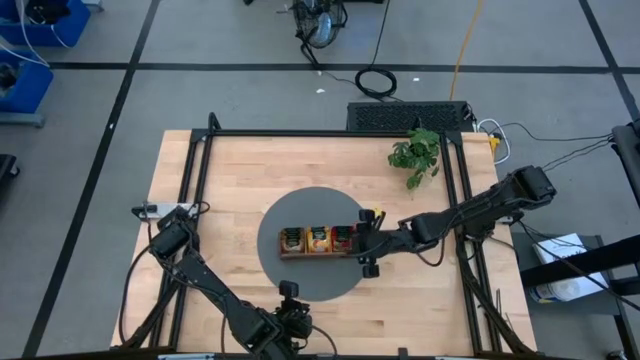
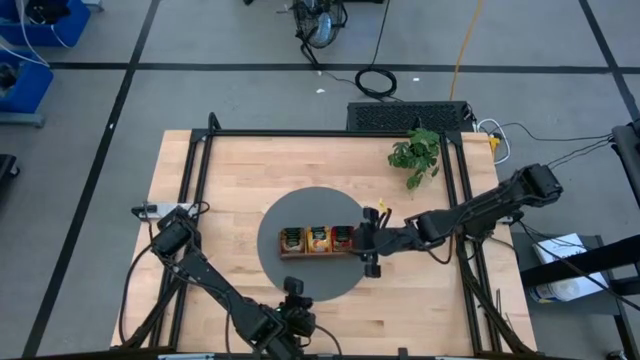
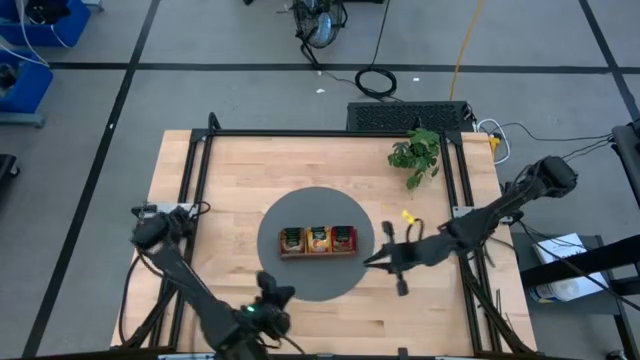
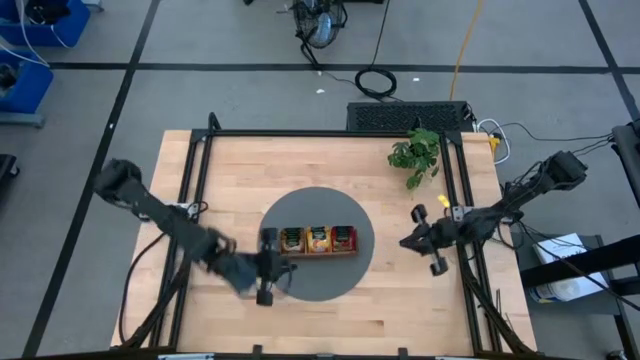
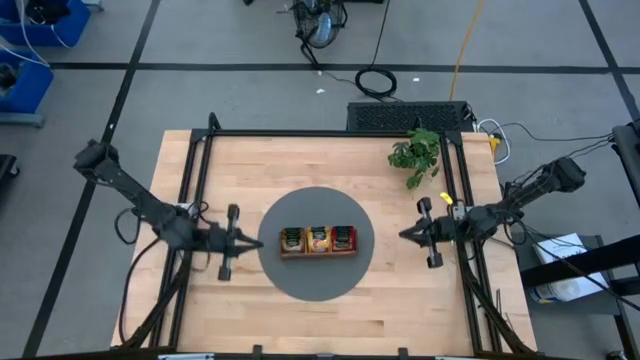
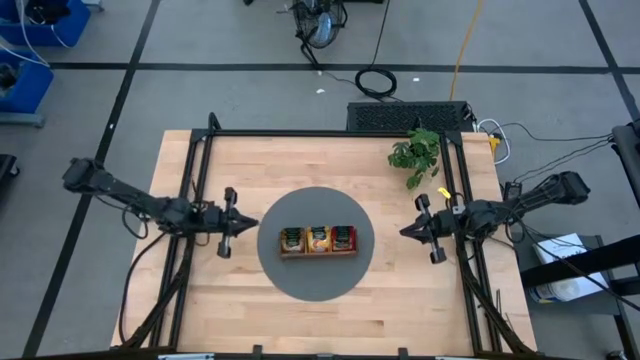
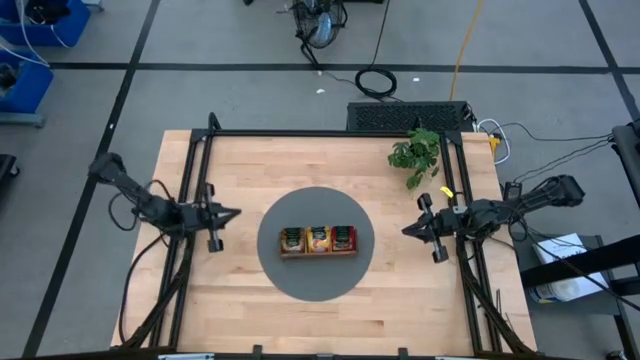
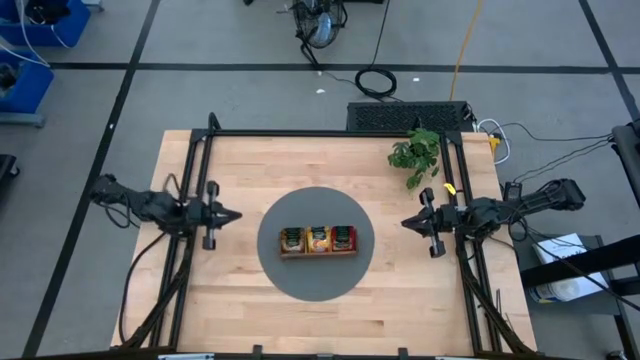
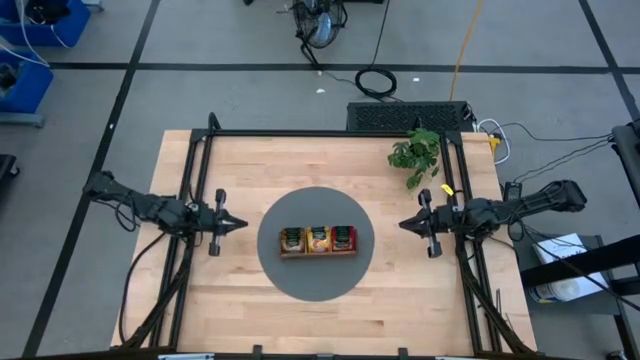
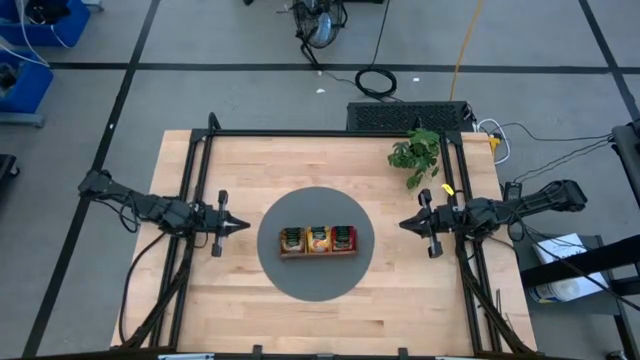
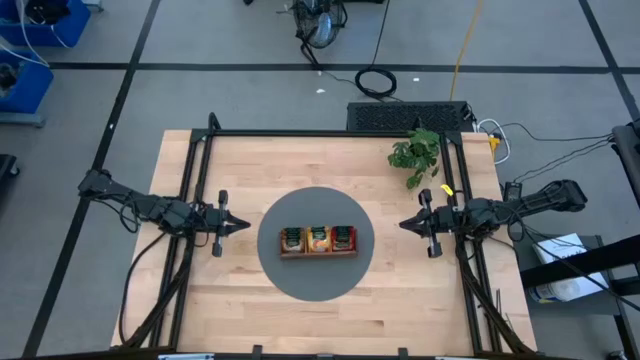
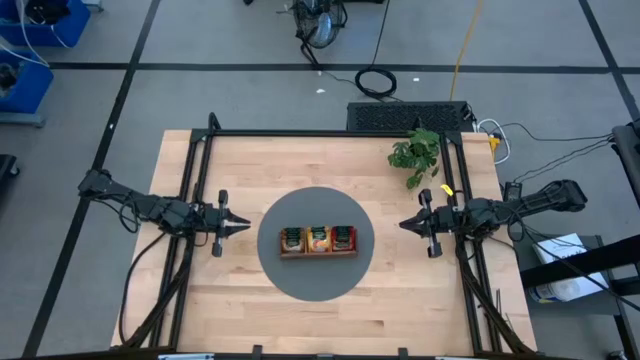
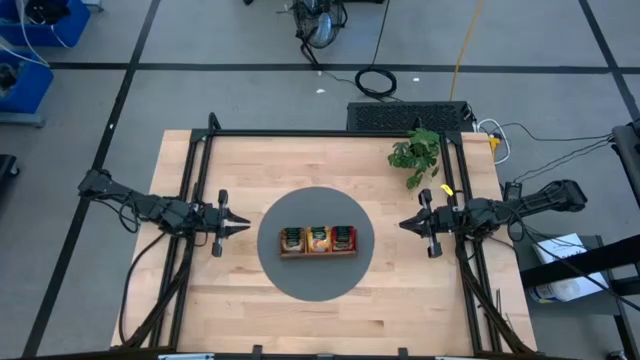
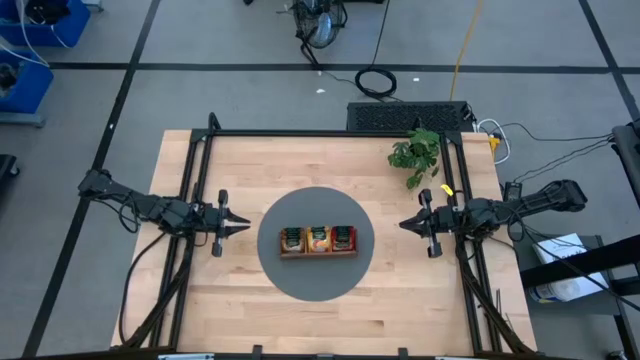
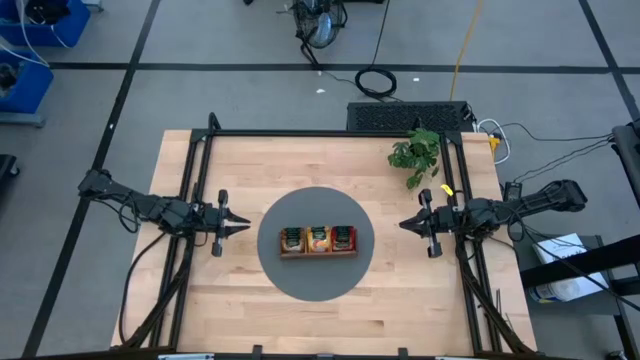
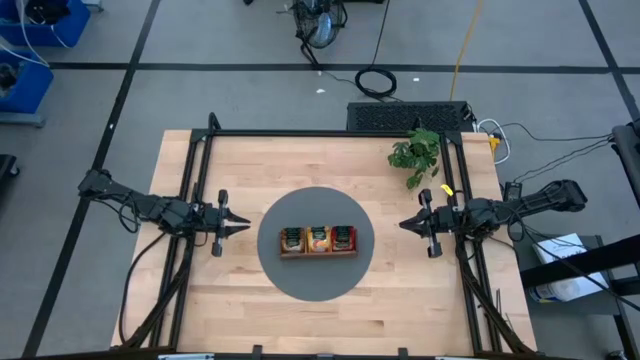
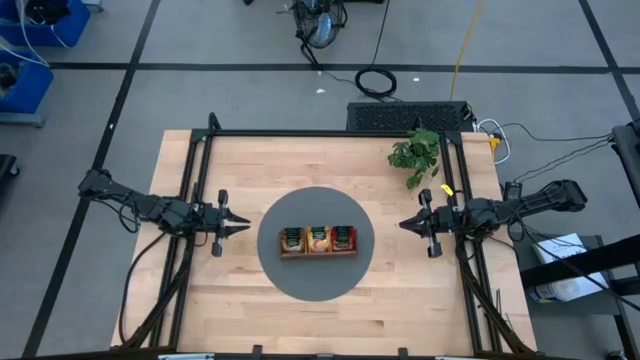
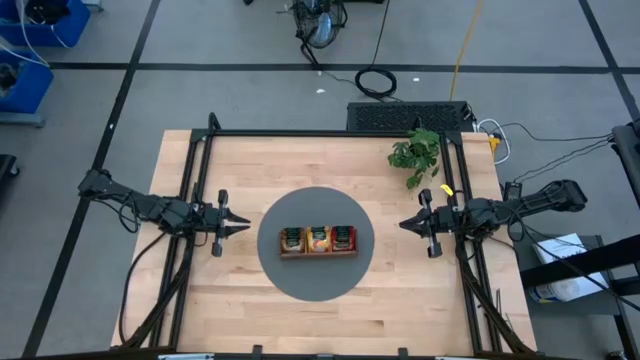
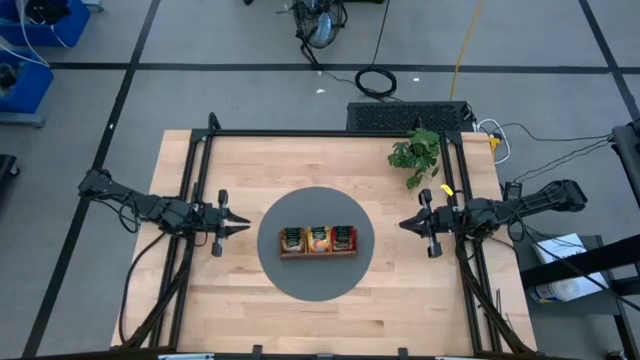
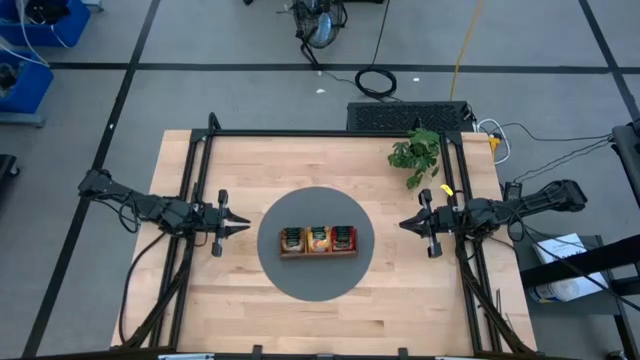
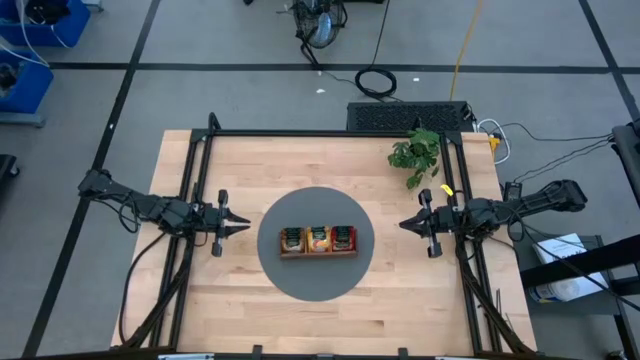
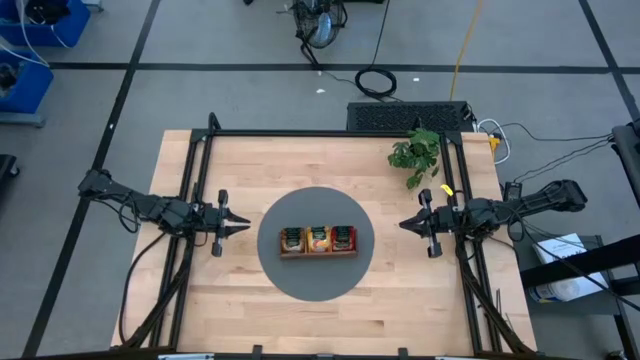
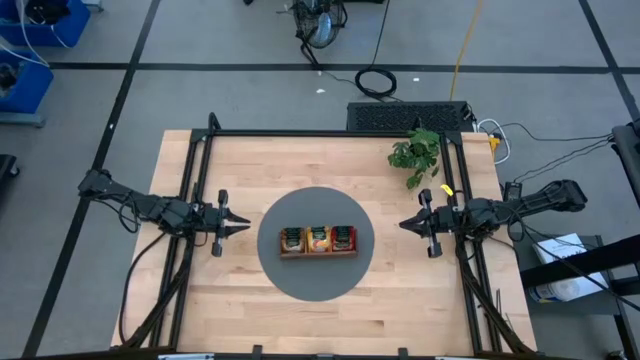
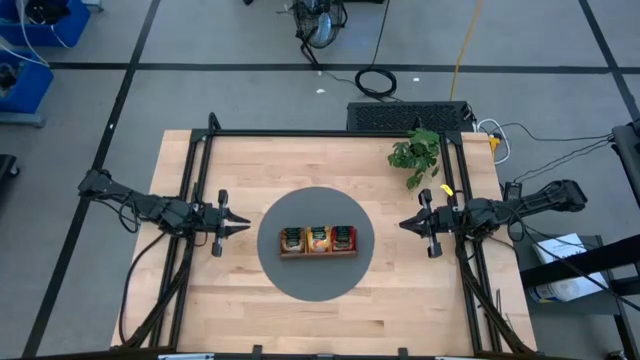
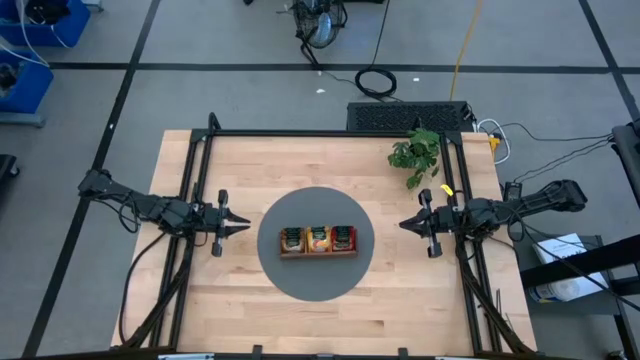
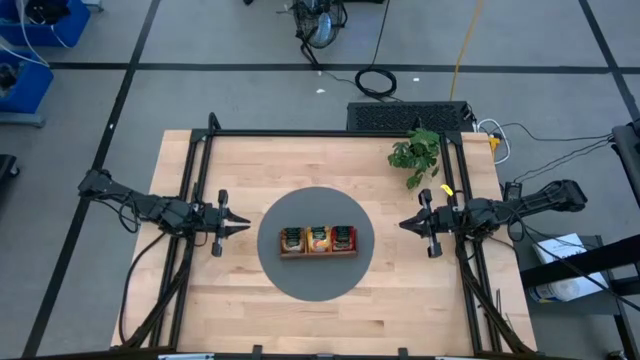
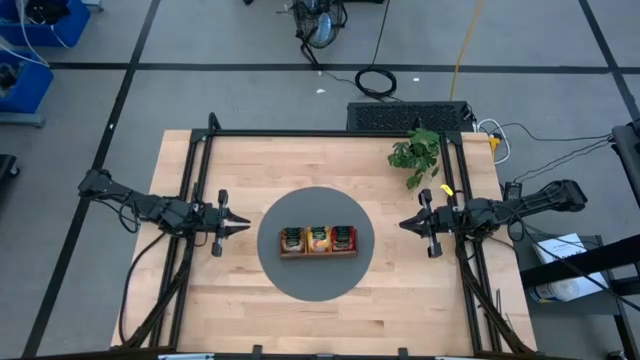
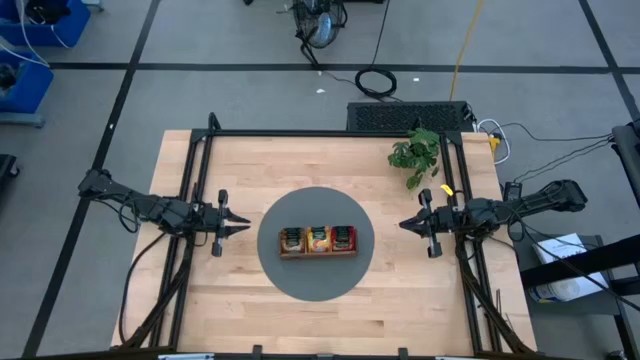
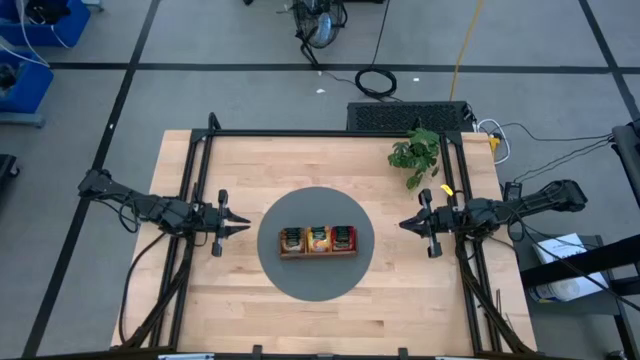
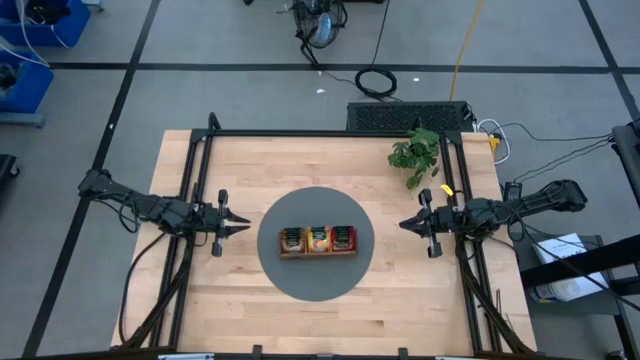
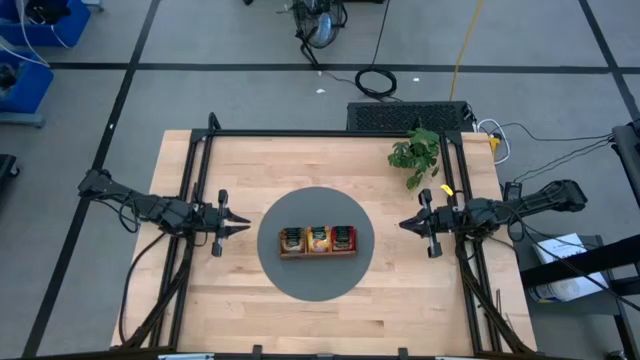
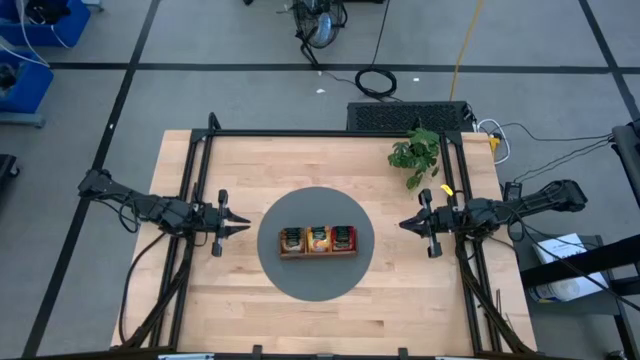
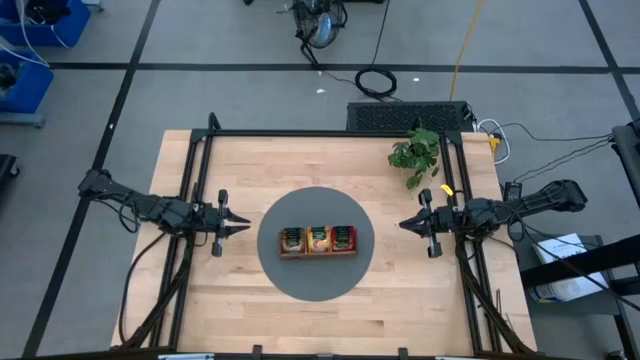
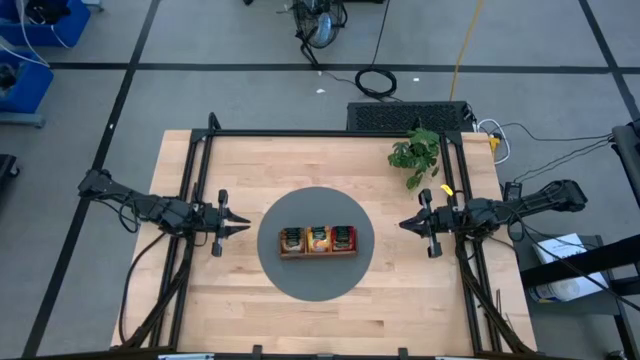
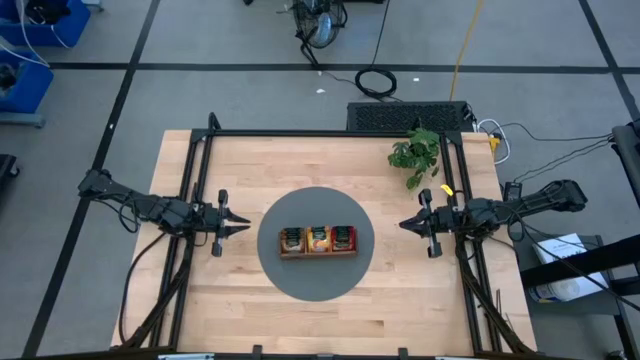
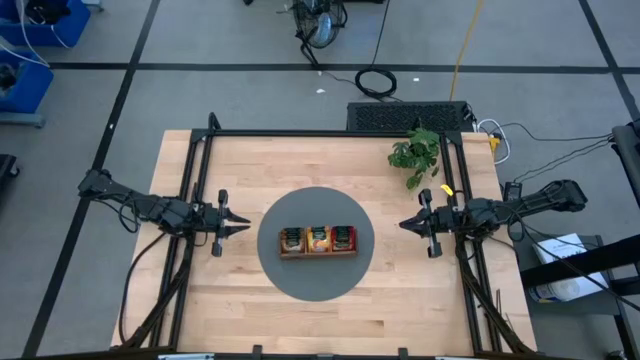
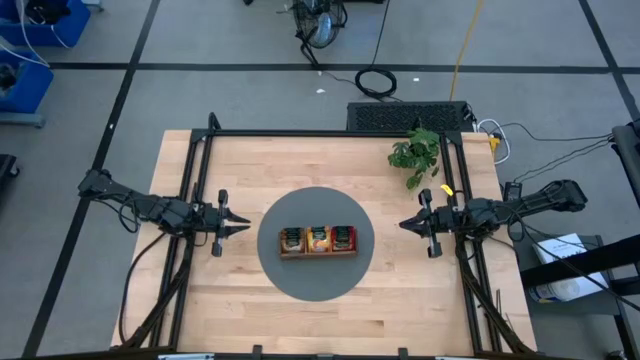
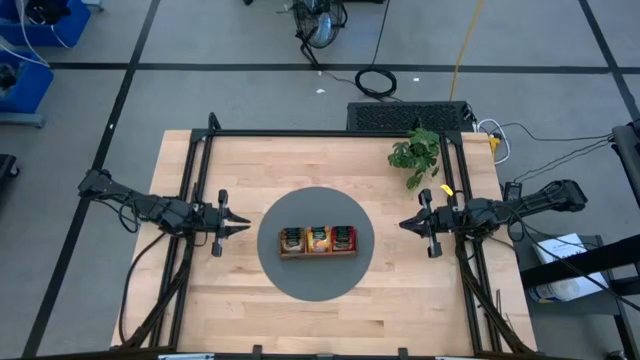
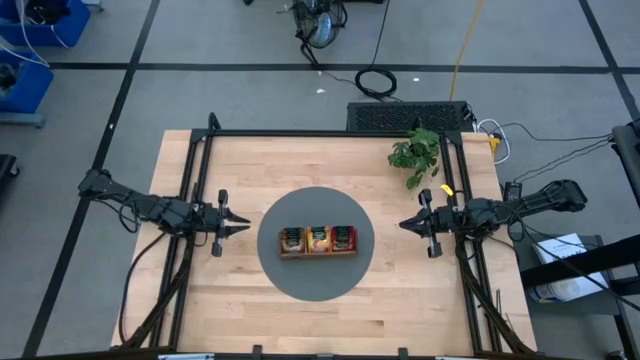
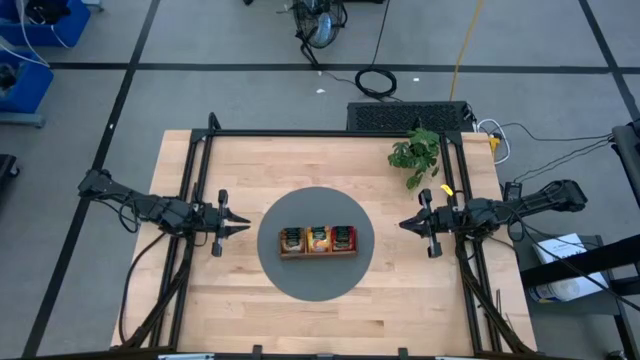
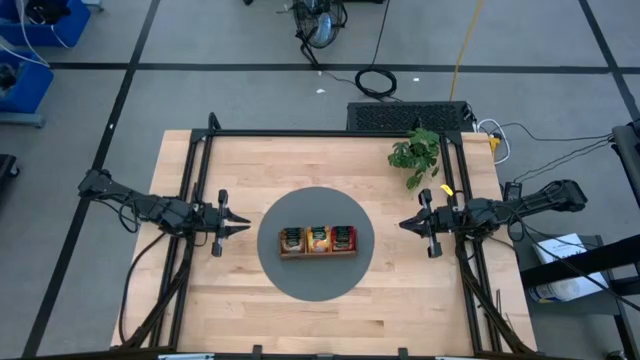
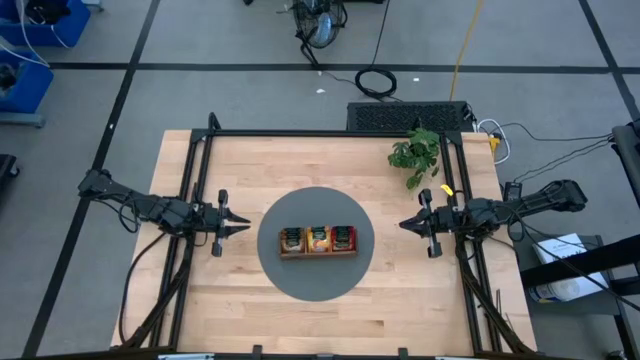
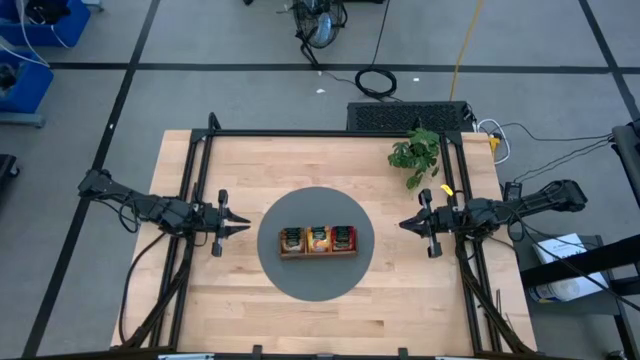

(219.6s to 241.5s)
Task: Pick & Place Tea
Return to Home Position
